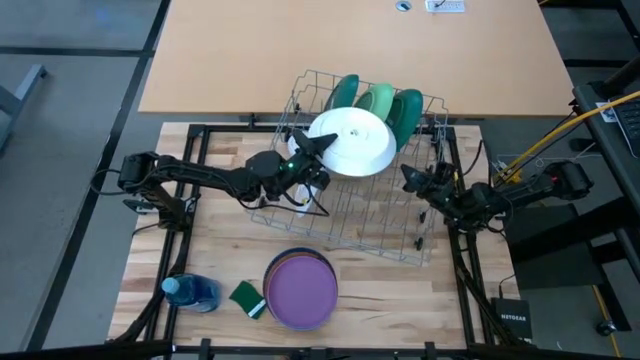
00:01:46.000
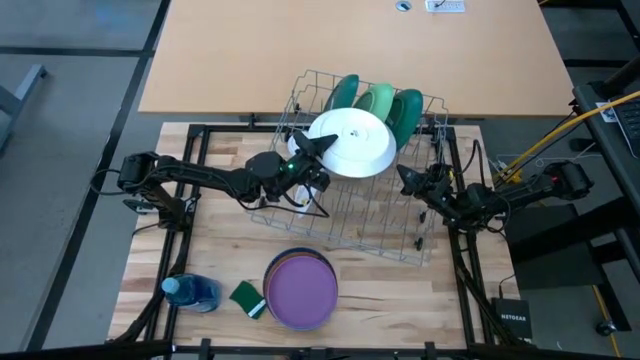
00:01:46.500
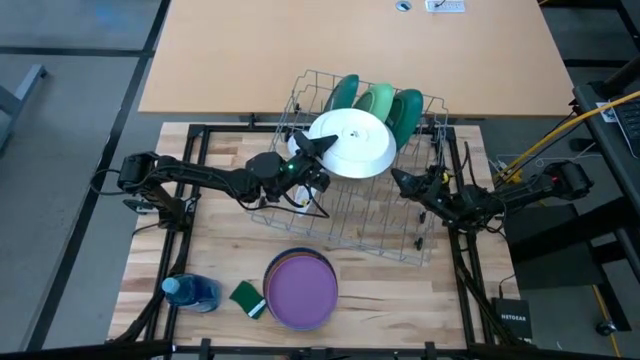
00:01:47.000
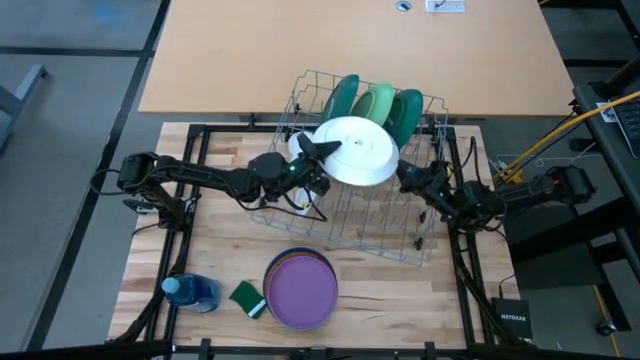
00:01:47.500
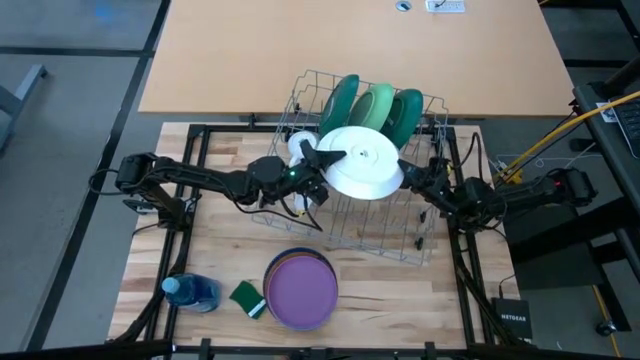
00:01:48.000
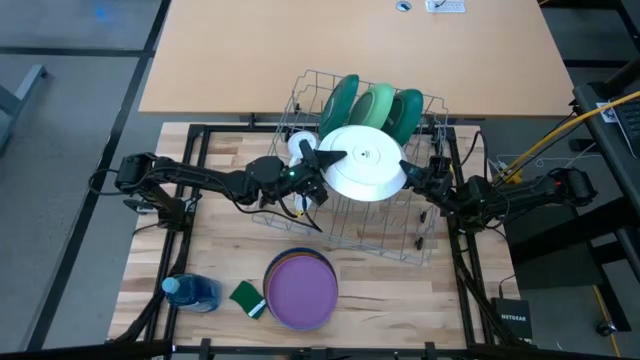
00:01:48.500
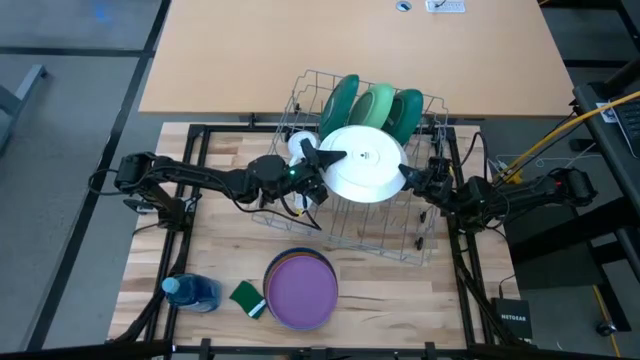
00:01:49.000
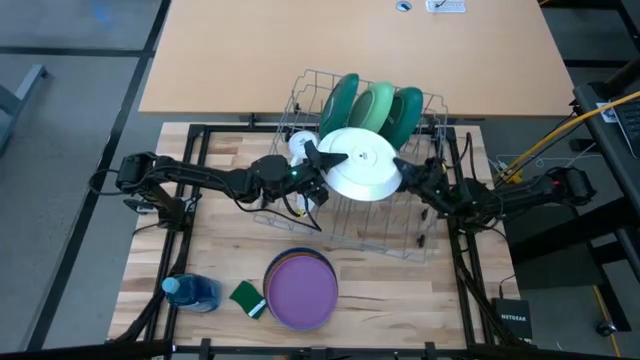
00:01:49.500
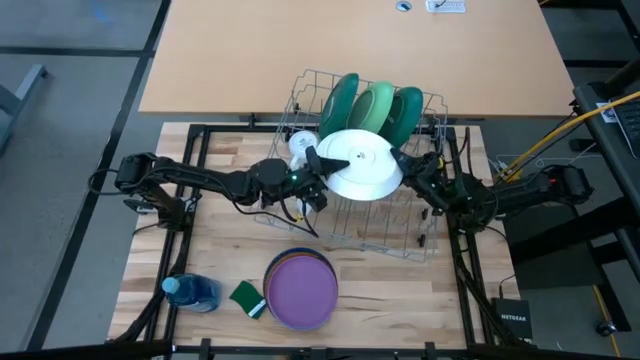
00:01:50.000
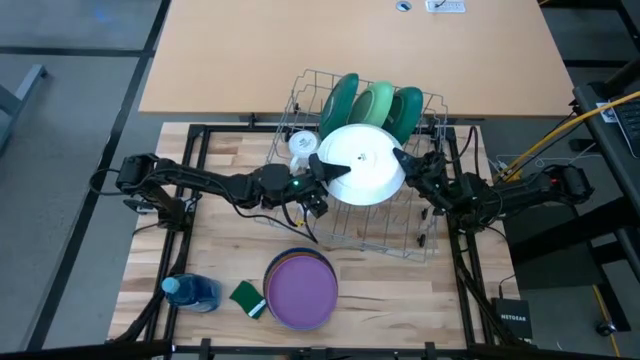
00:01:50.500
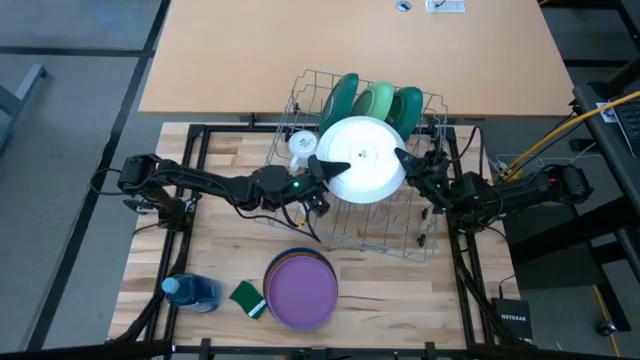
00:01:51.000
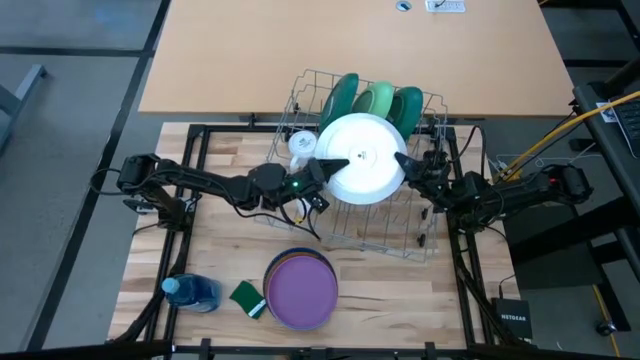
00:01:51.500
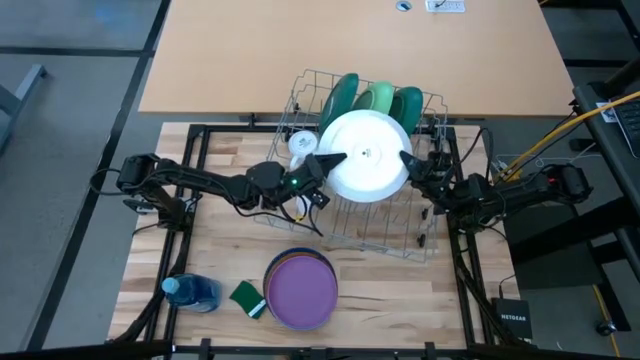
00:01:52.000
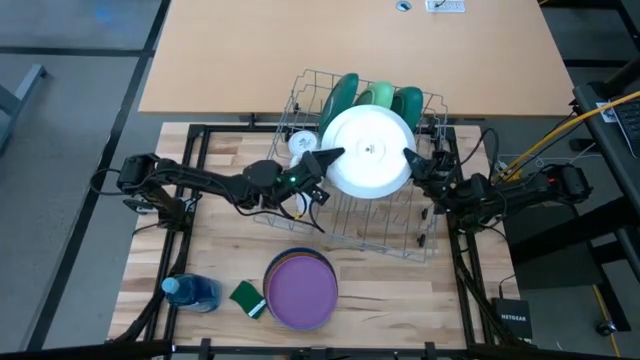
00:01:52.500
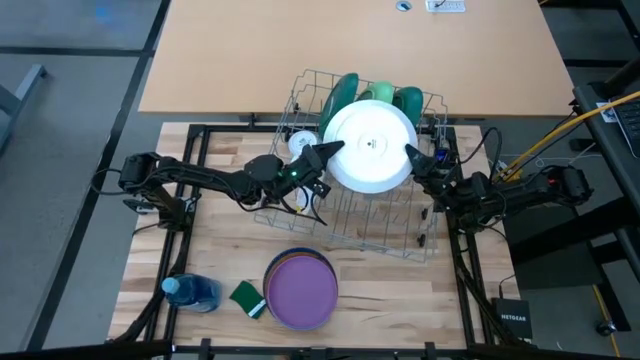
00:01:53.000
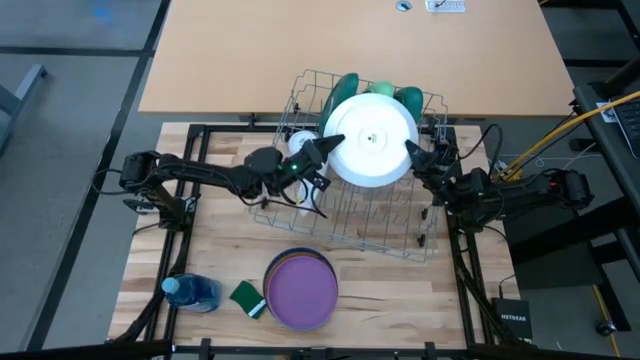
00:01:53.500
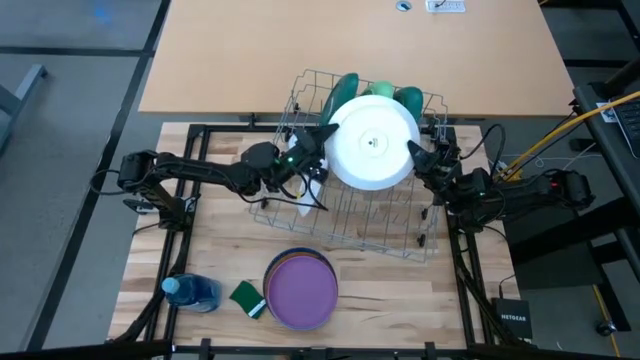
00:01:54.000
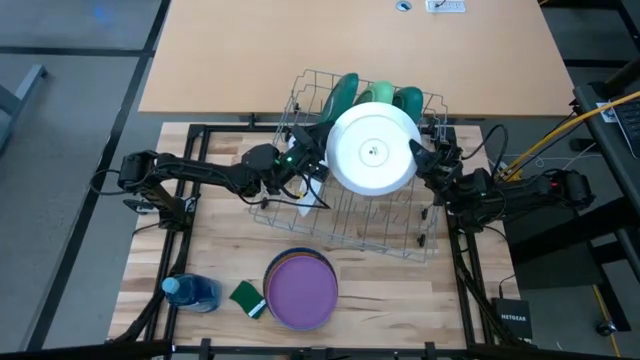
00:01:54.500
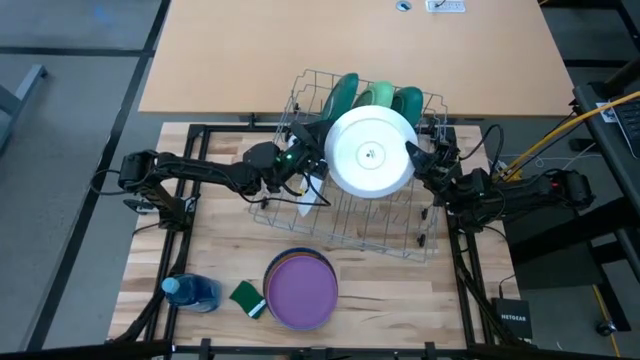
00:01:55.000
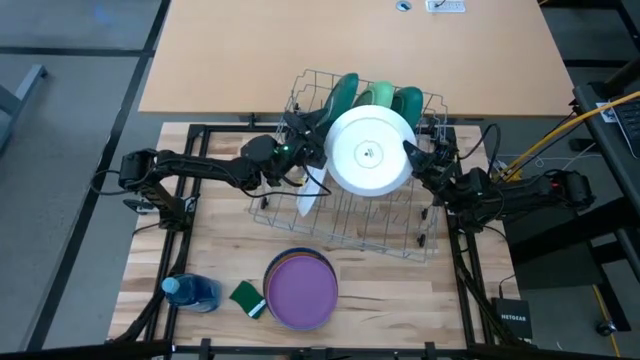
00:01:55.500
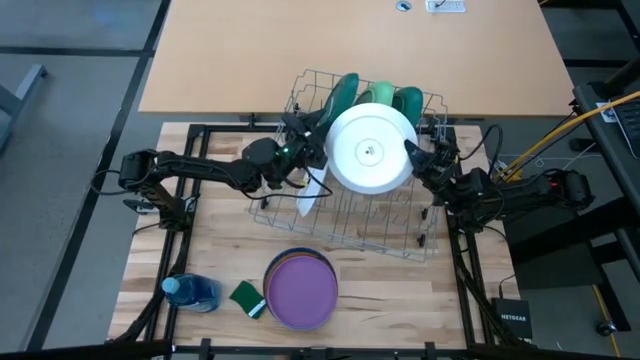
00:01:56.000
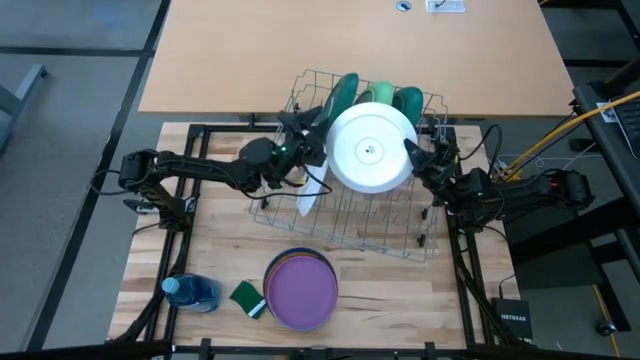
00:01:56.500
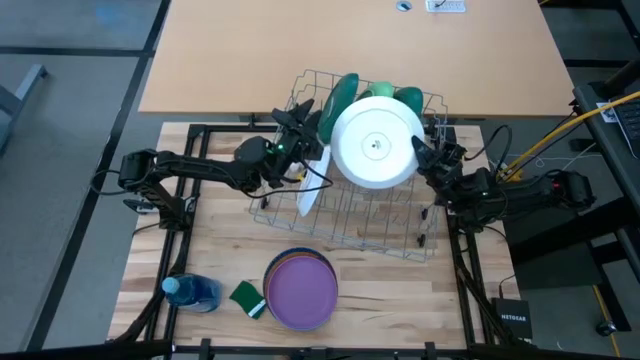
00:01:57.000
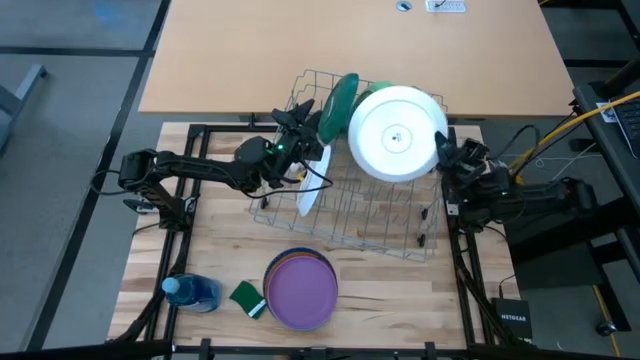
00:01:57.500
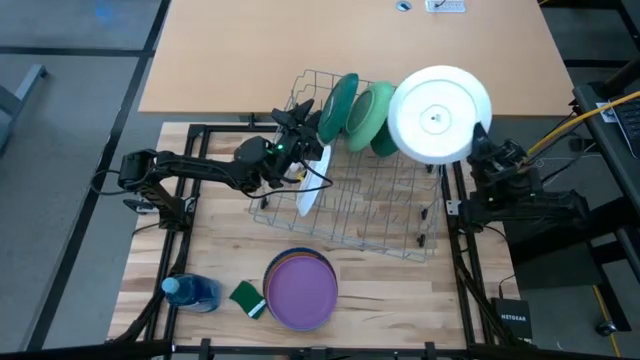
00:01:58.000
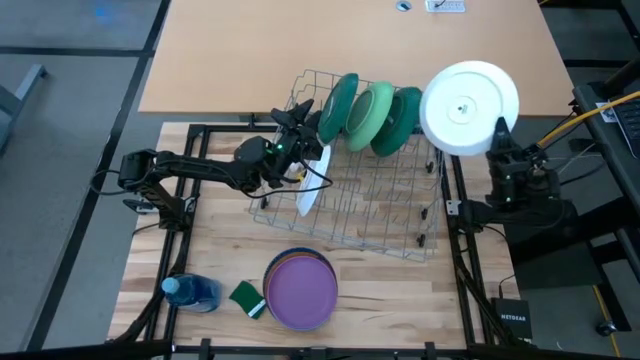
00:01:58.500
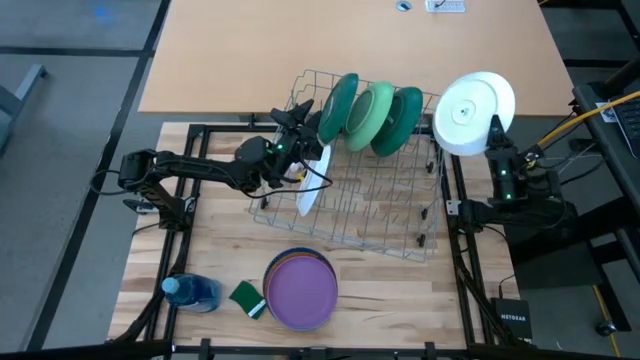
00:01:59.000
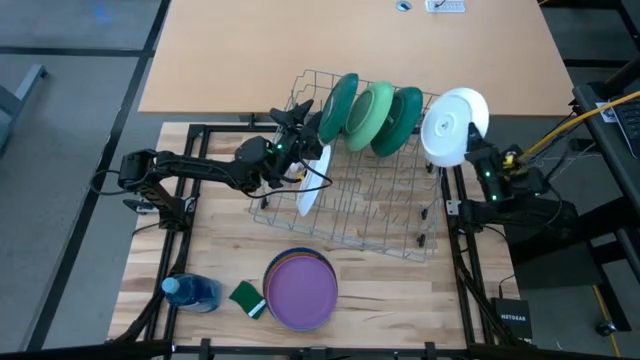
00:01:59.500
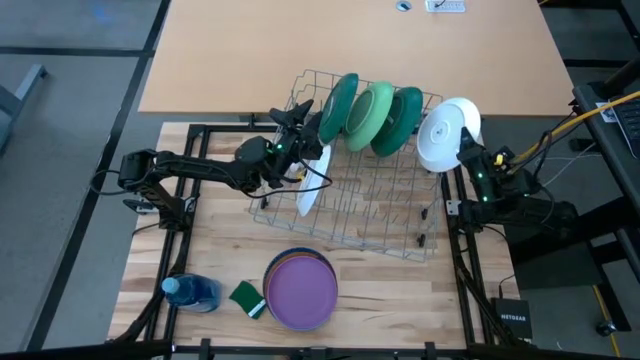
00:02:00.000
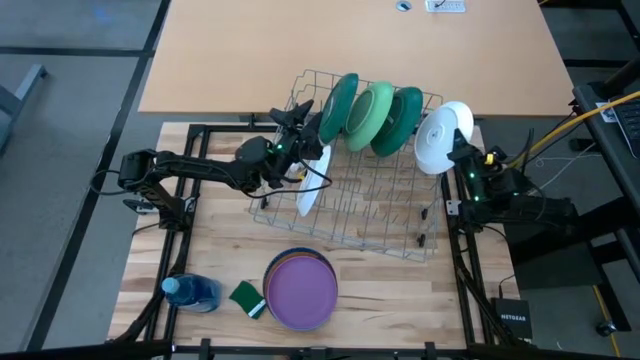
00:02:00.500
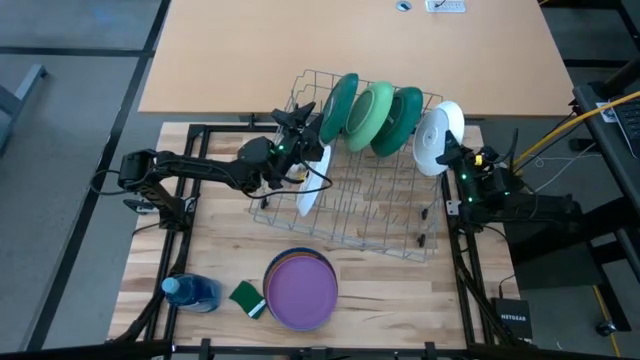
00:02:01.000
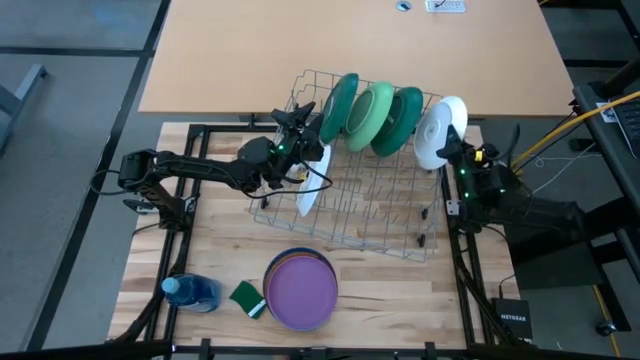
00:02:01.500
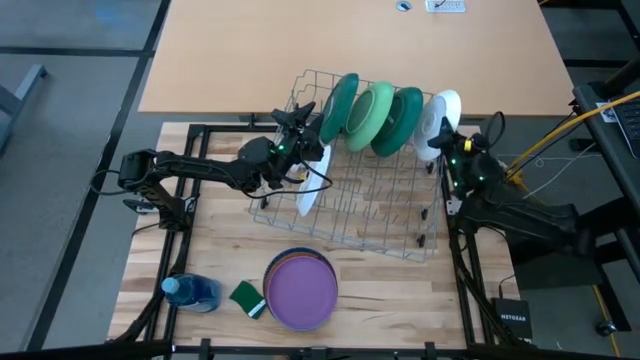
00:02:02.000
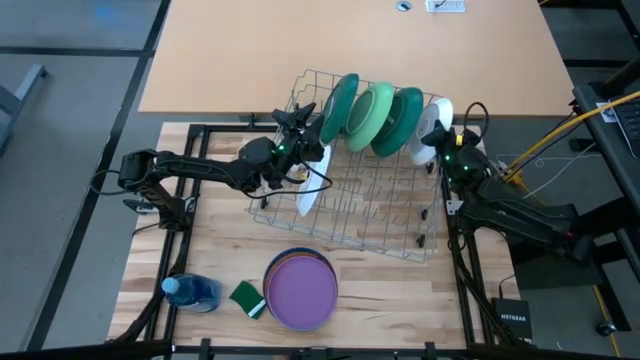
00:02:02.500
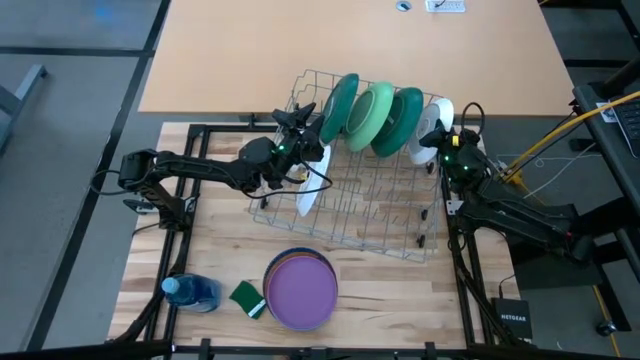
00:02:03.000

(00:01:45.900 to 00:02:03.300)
Task: Sort dishes
Put the white plate in the dish rack
